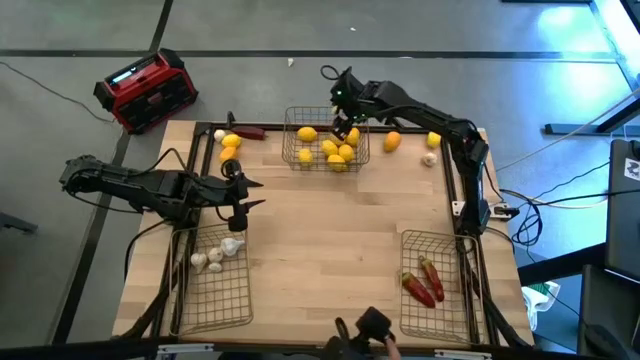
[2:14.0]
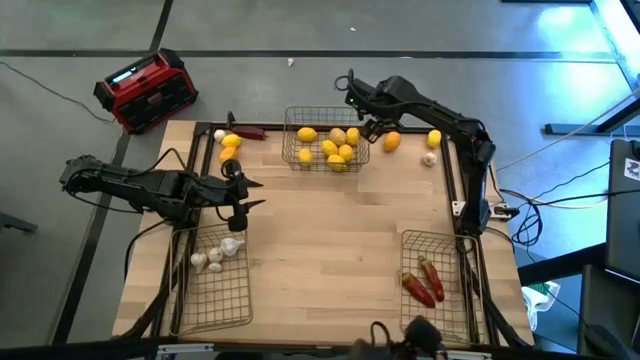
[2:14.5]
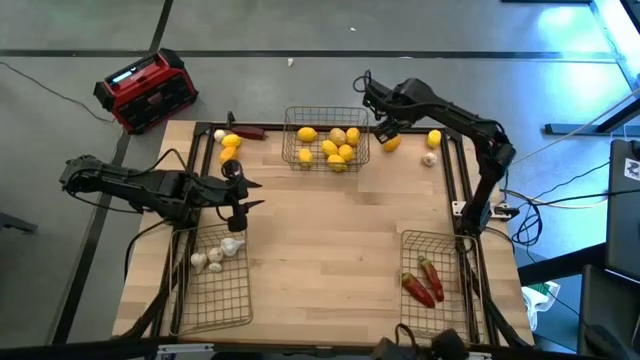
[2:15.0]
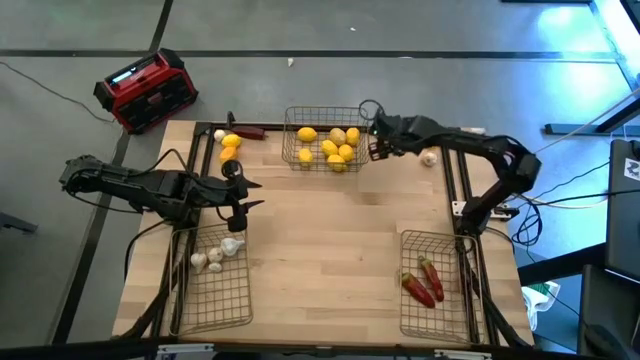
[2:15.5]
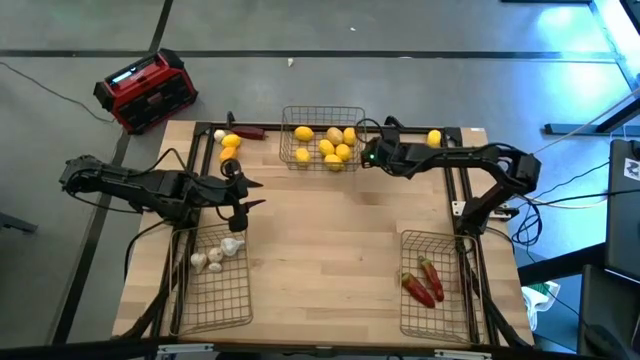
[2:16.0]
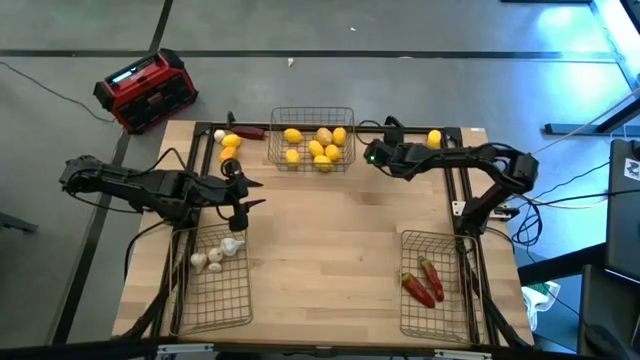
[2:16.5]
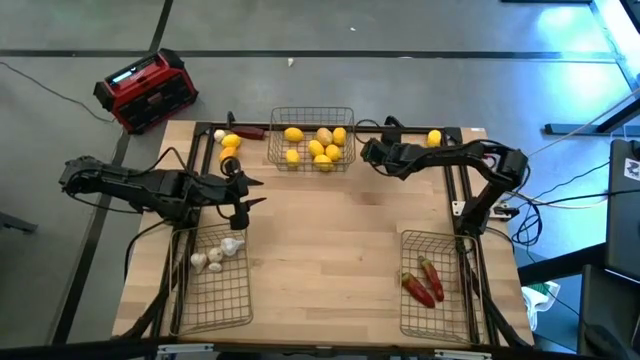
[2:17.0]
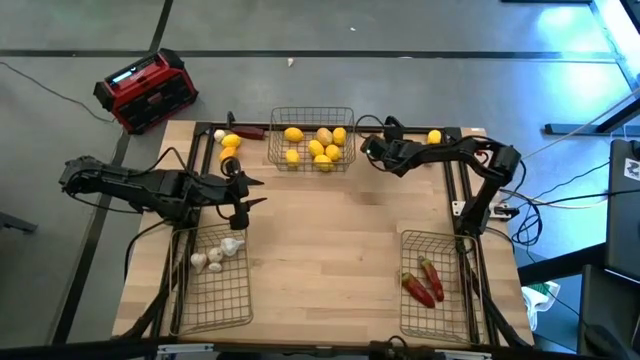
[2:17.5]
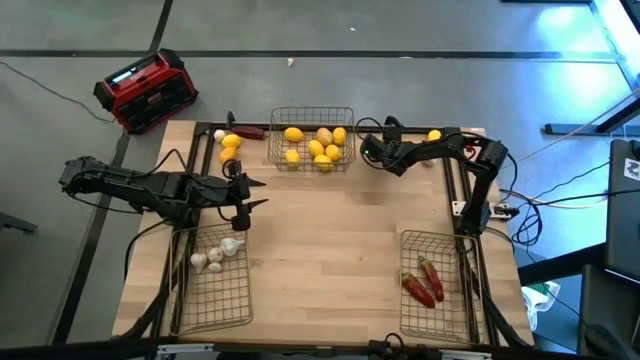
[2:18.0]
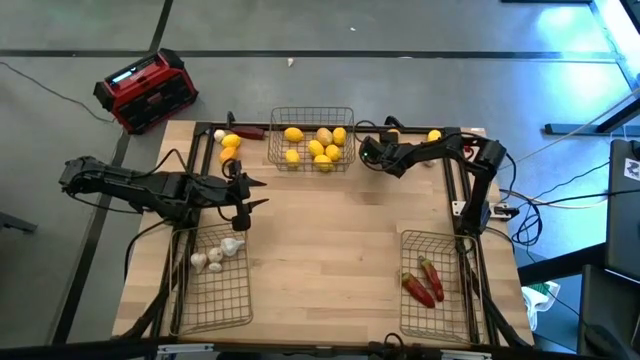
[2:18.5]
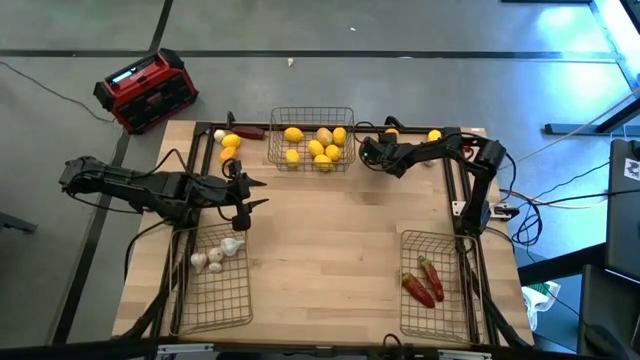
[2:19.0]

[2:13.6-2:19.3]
Task: Sort produce into baskets
Put the lemon into the top wire basket

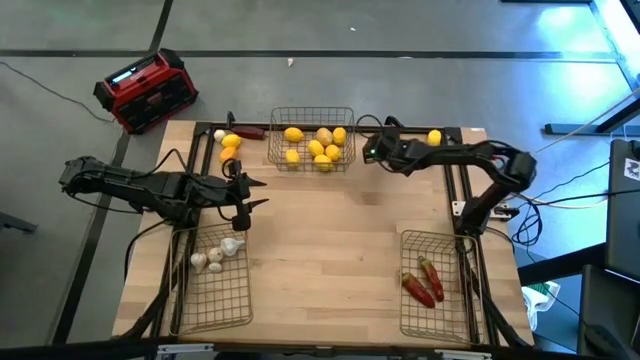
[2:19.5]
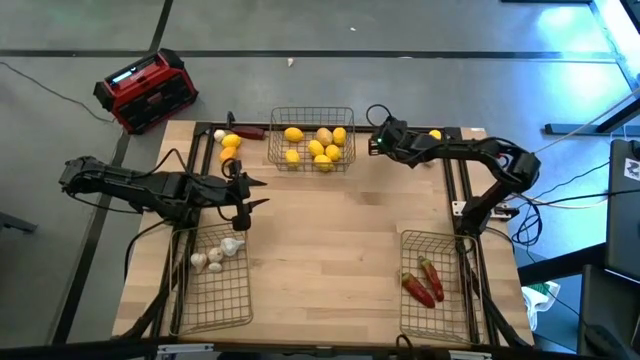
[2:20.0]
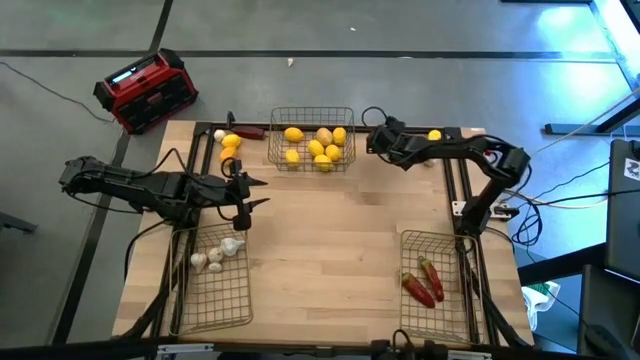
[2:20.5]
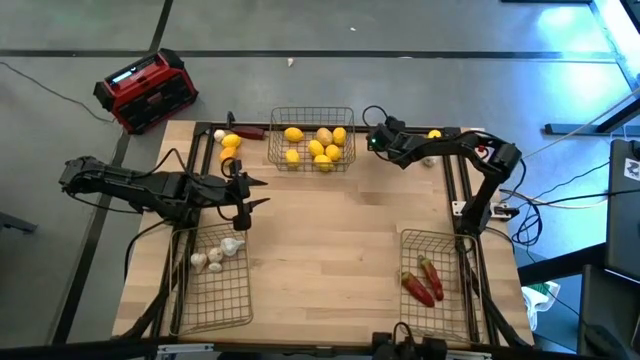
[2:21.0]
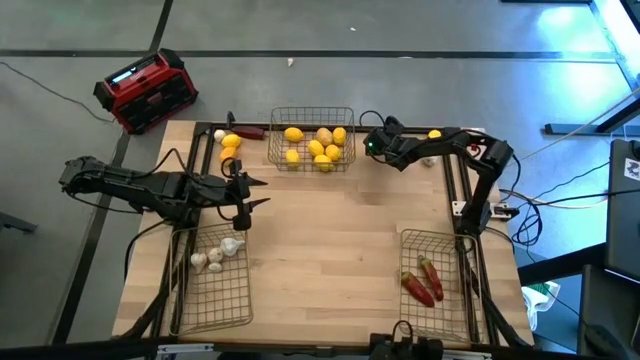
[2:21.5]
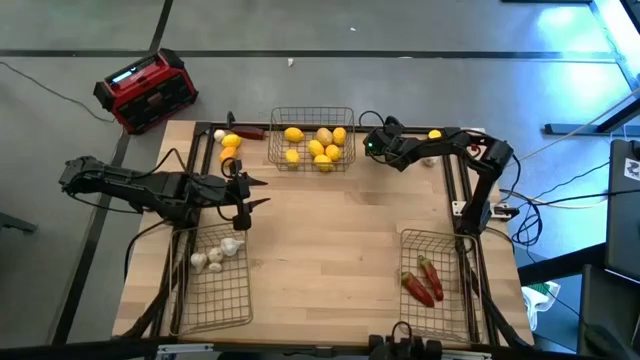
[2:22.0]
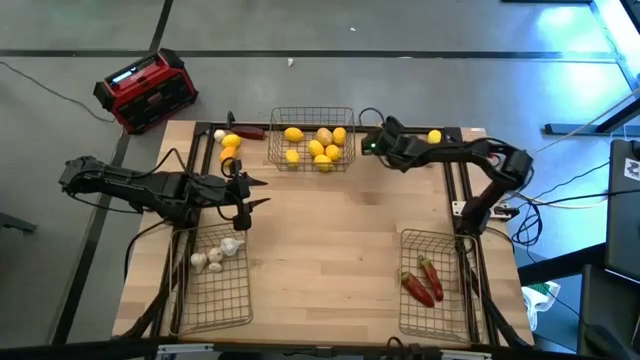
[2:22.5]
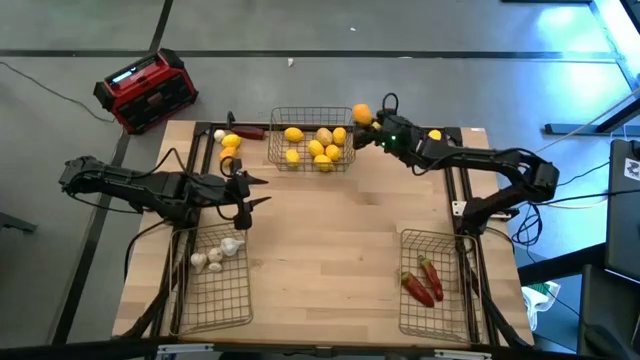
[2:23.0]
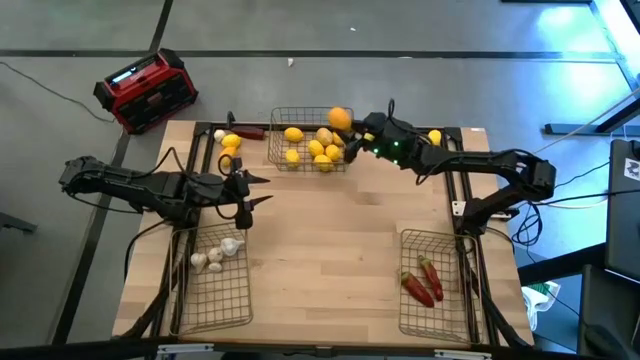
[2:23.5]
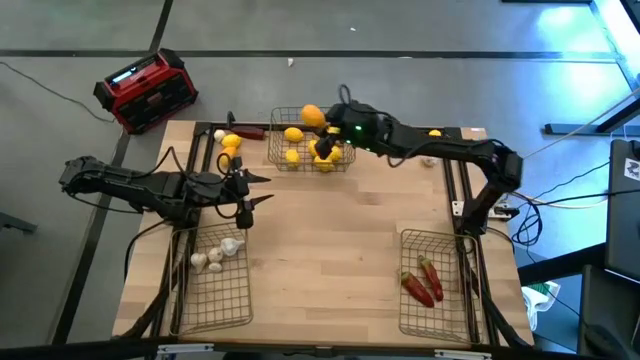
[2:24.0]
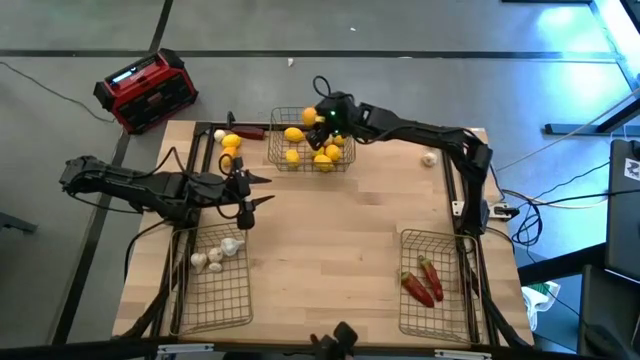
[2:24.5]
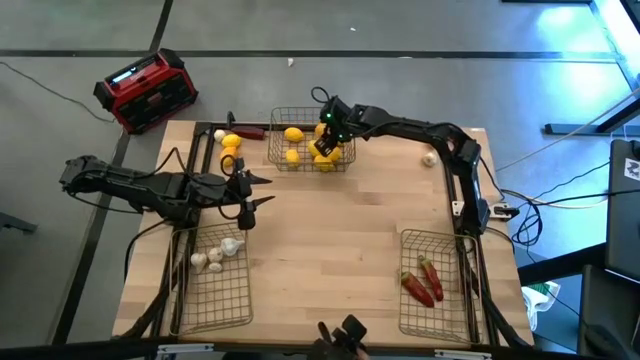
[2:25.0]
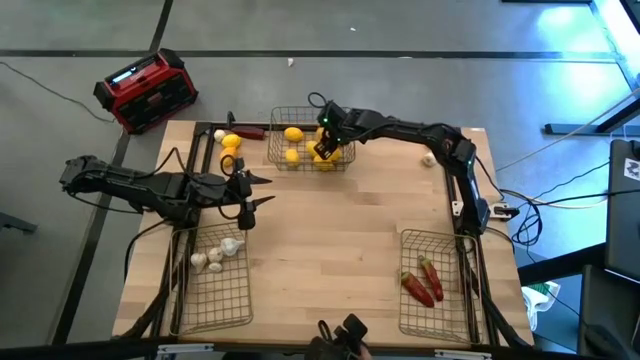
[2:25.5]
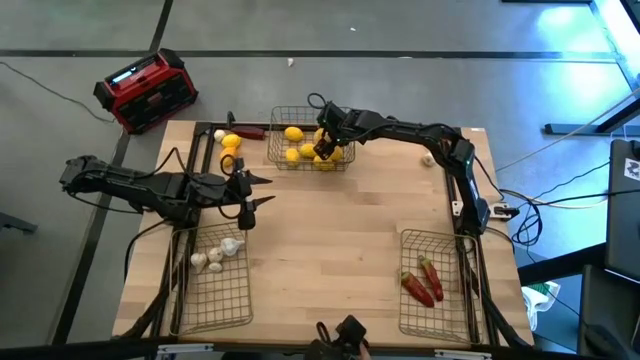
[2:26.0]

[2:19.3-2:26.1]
Put the lemon into the top wire basket

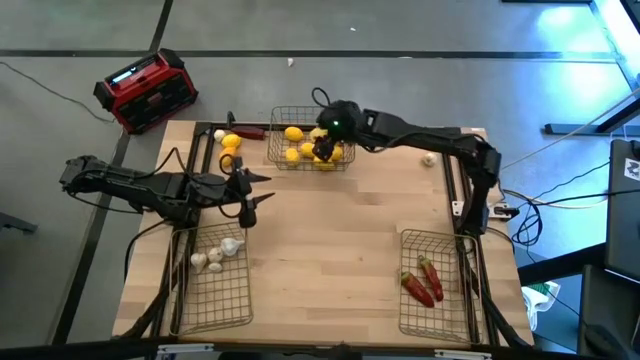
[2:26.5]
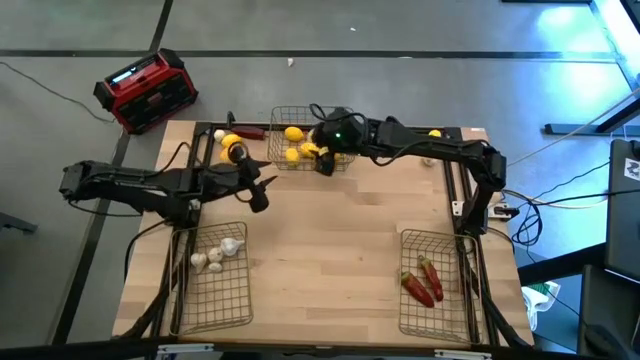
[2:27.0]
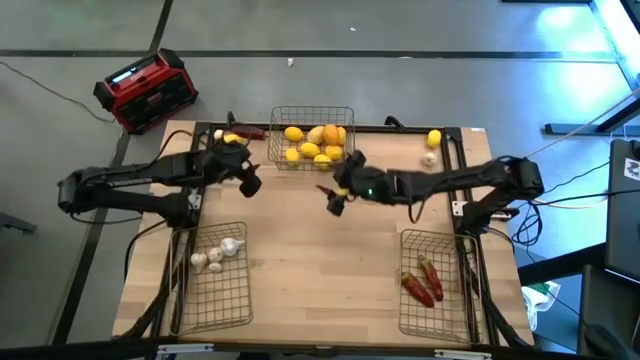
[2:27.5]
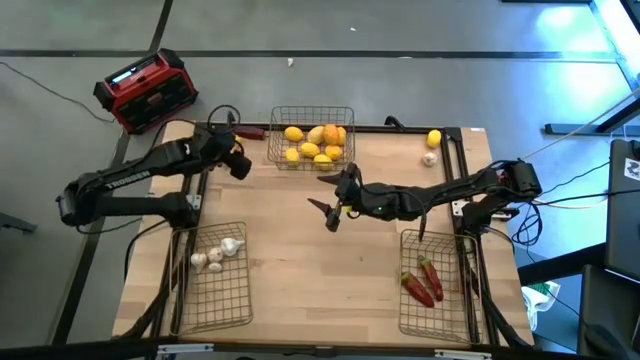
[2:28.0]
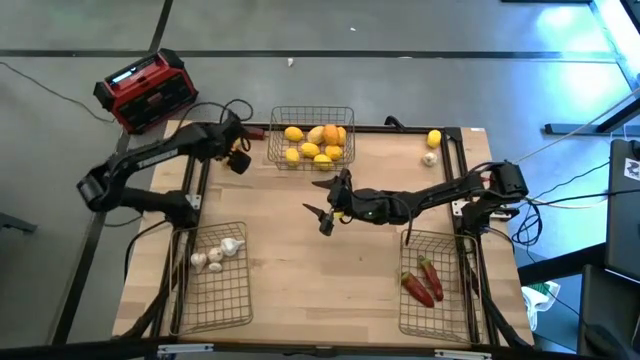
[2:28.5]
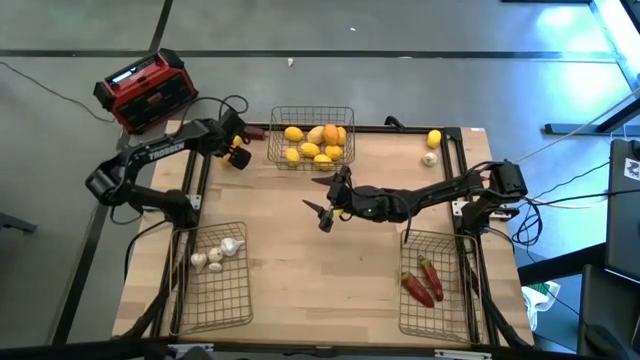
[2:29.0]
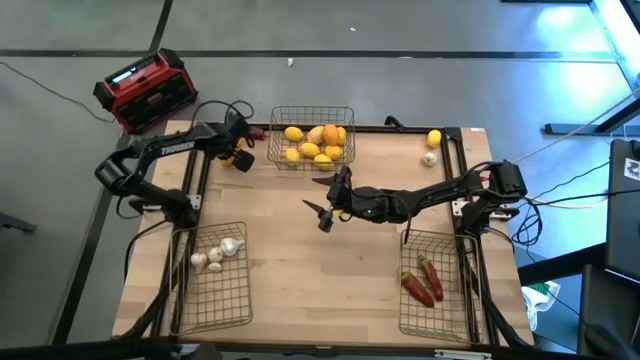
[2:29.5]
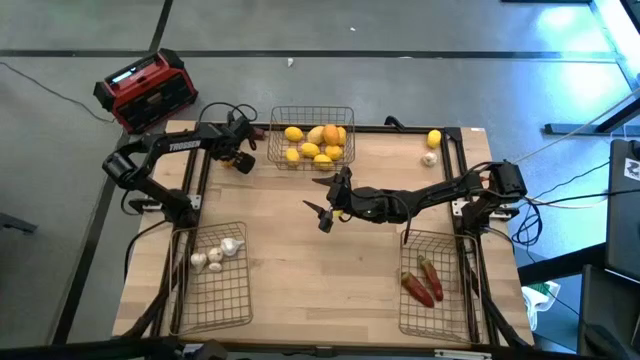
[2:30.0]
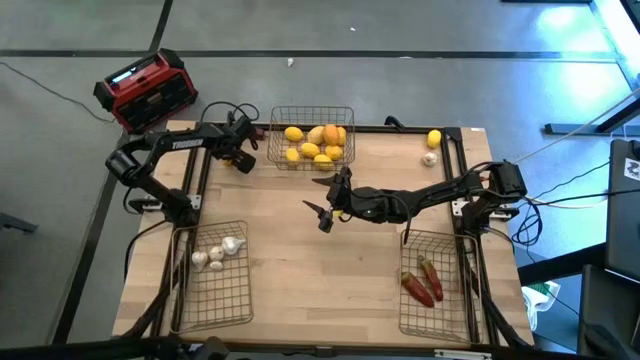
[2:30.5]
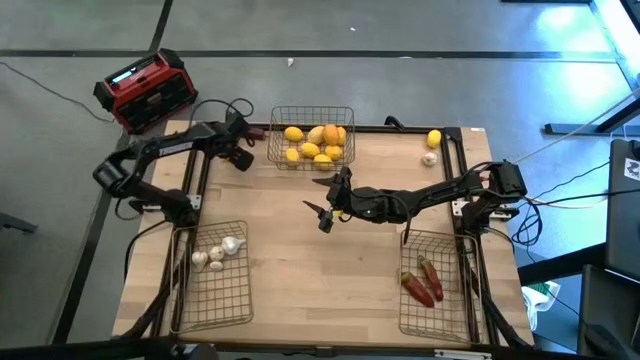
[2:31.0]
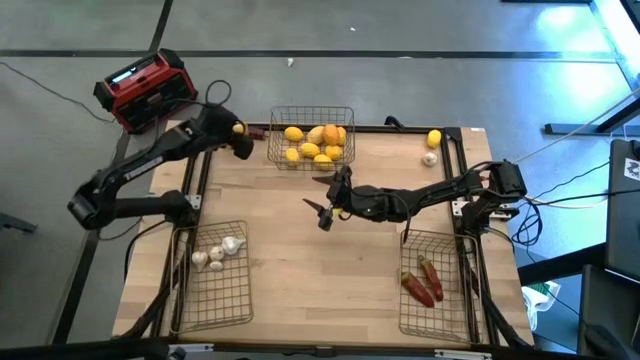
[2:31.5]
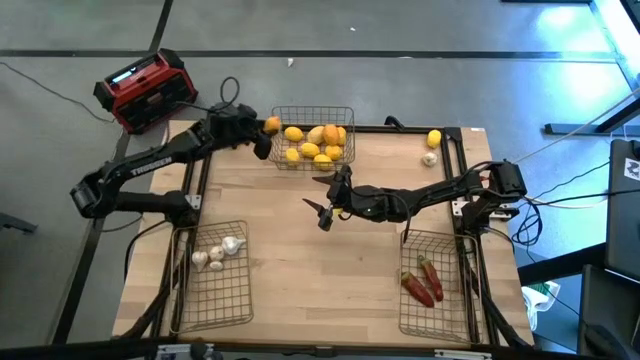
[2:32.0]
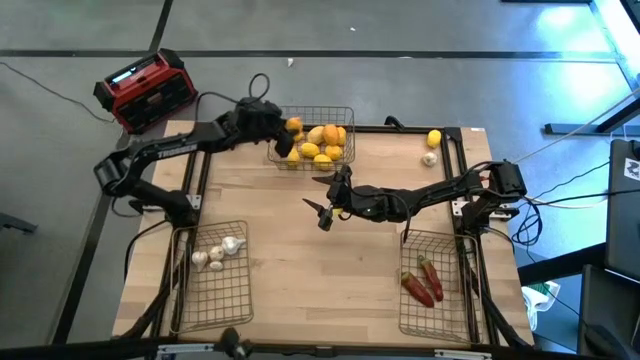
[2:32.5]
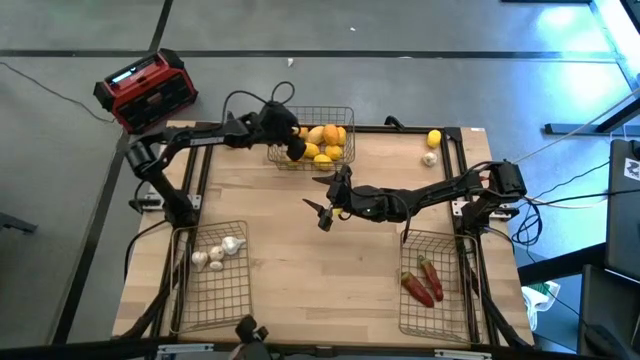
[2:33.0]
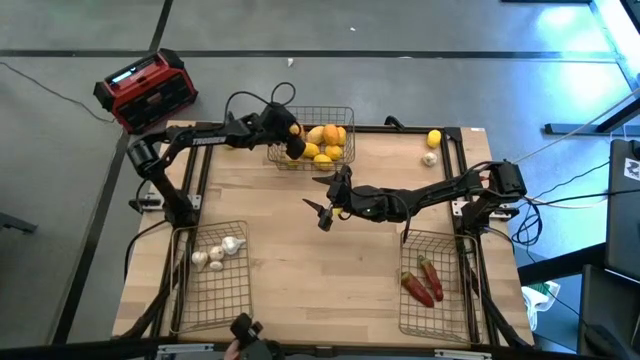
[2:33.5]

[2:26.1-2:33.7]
Put the lemon into the top wire basket
